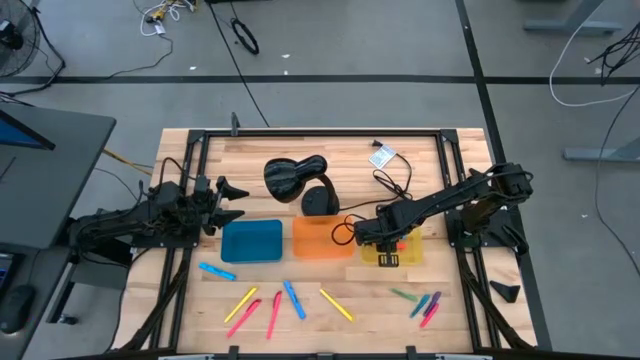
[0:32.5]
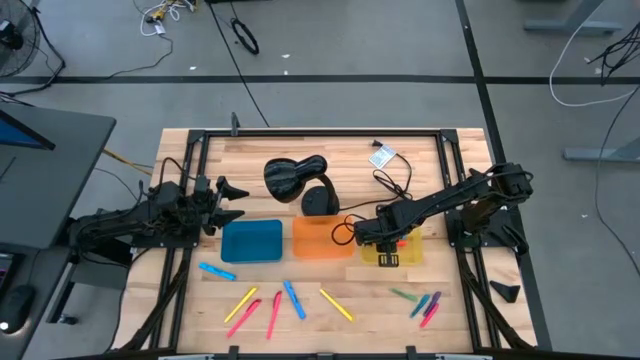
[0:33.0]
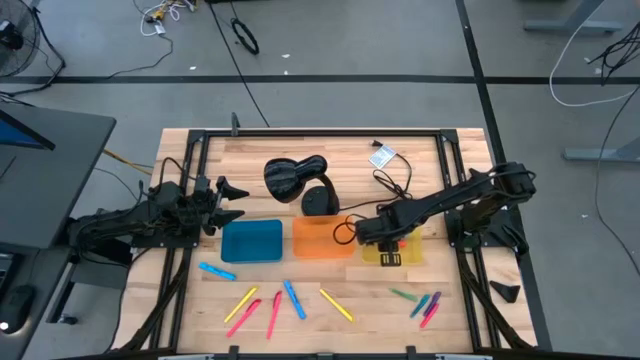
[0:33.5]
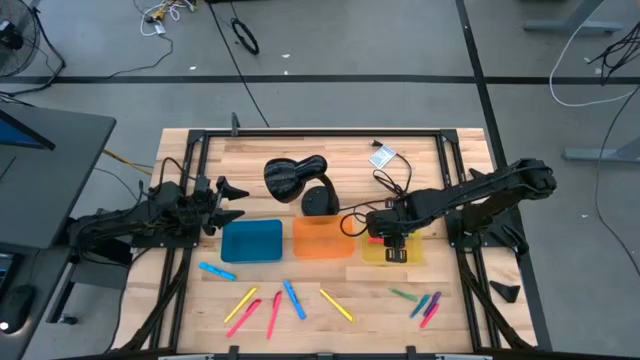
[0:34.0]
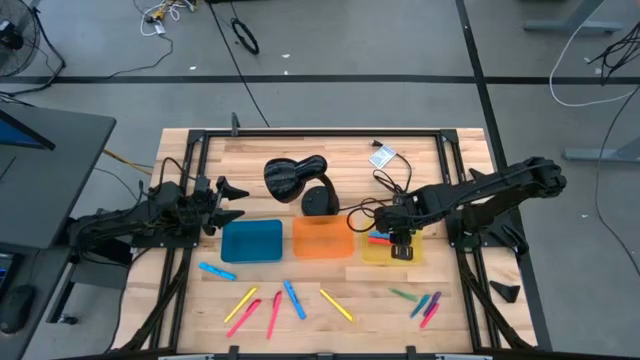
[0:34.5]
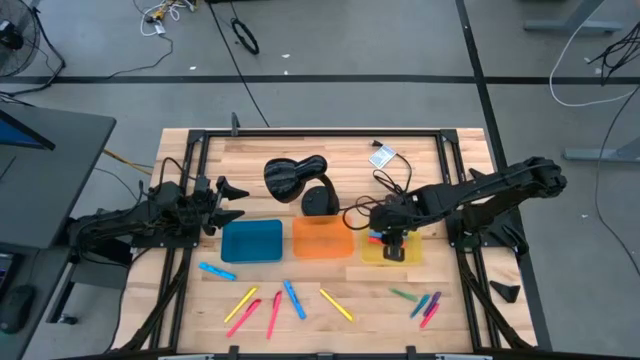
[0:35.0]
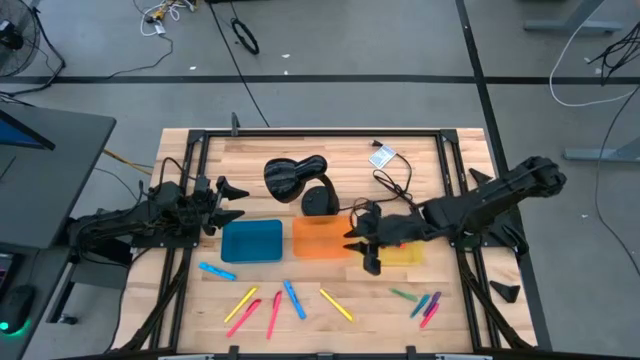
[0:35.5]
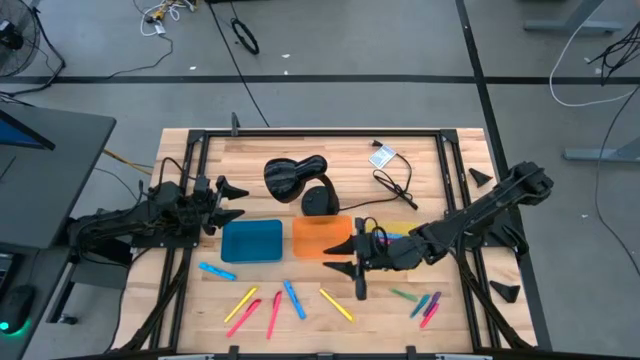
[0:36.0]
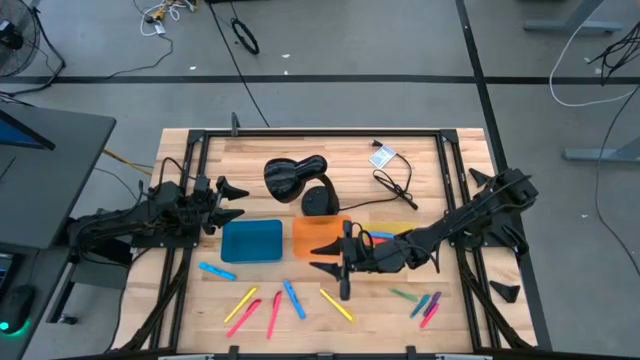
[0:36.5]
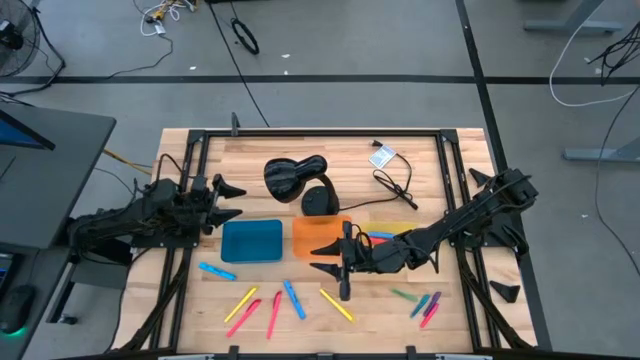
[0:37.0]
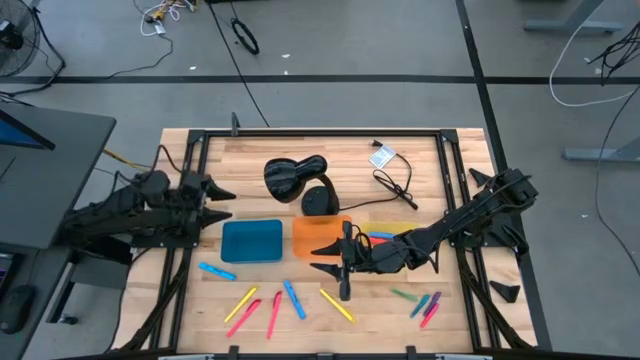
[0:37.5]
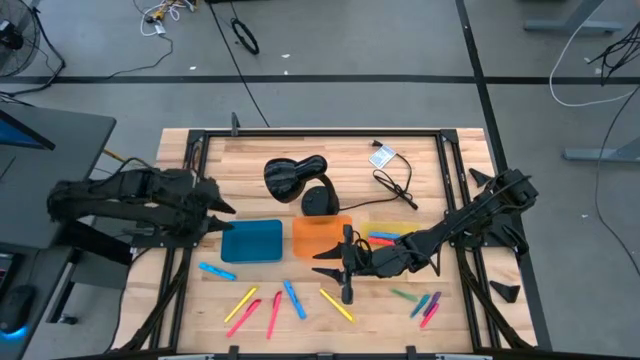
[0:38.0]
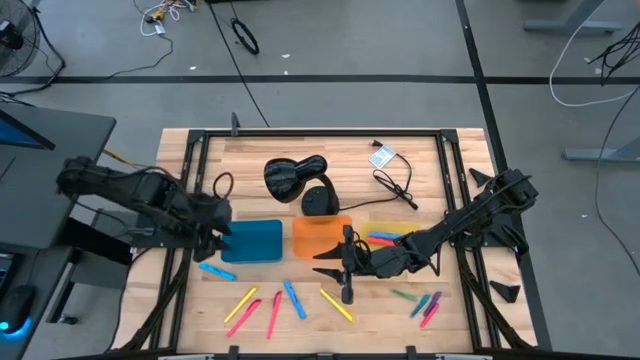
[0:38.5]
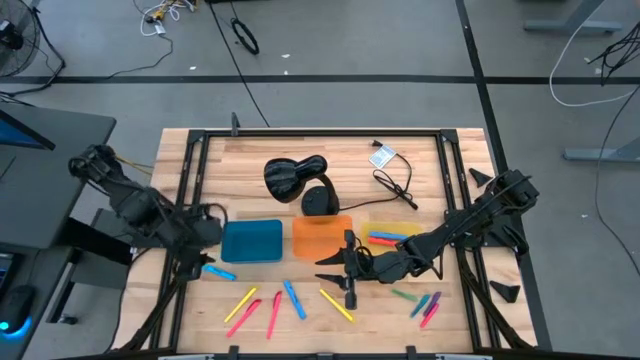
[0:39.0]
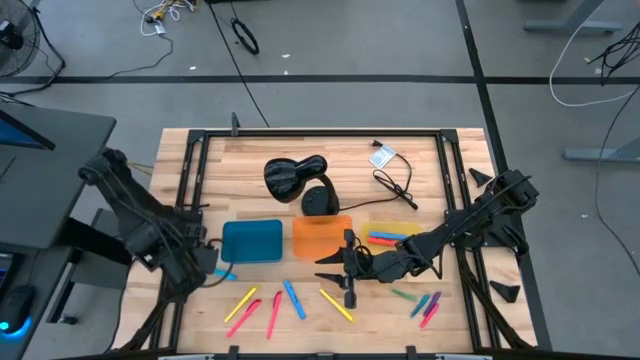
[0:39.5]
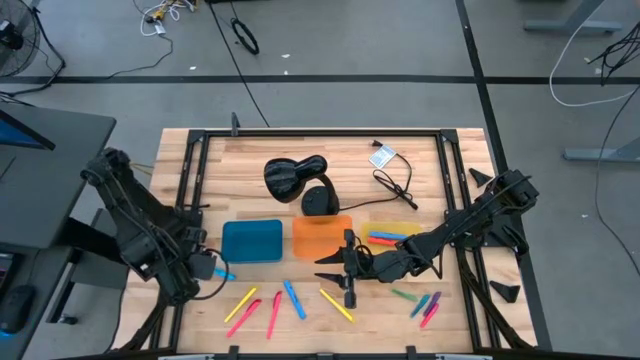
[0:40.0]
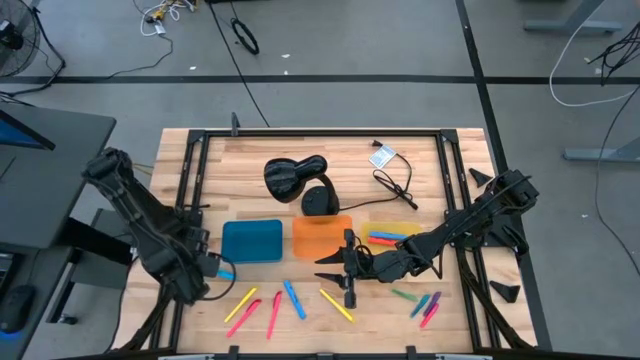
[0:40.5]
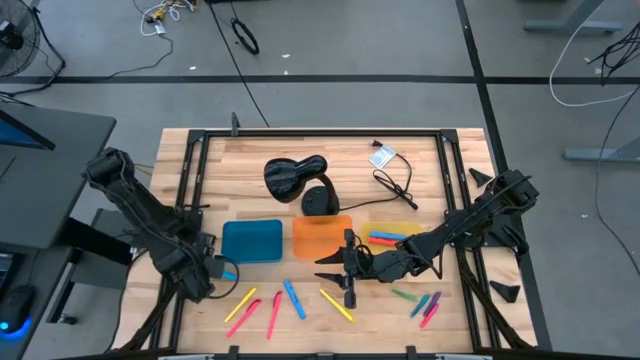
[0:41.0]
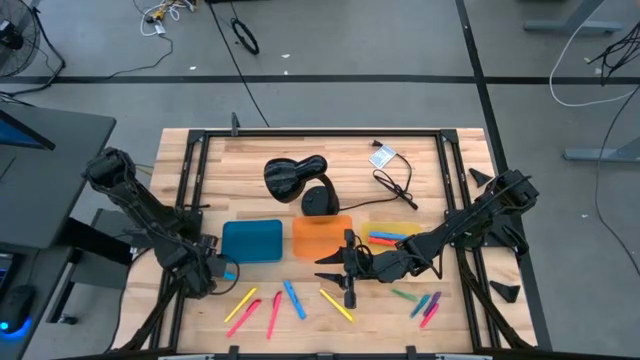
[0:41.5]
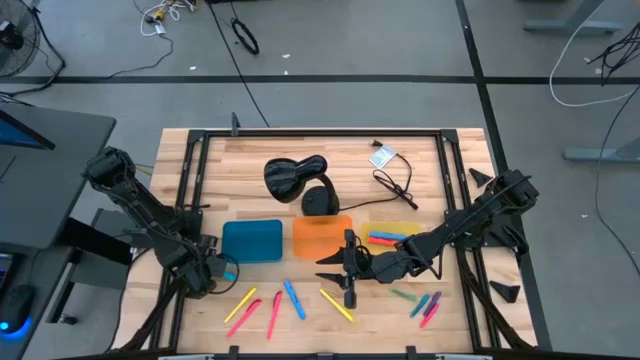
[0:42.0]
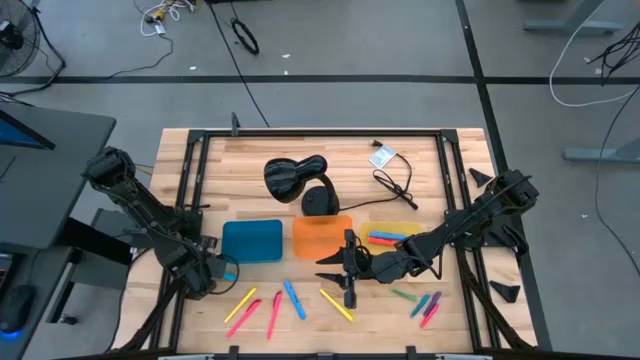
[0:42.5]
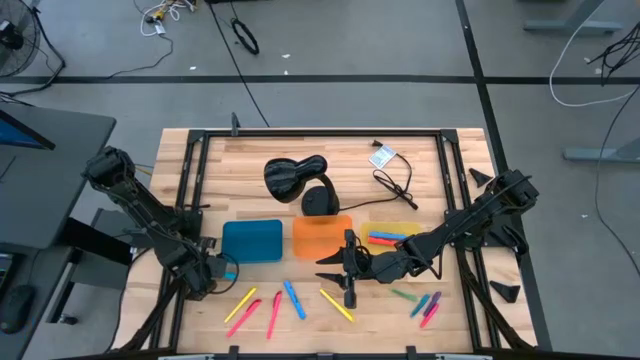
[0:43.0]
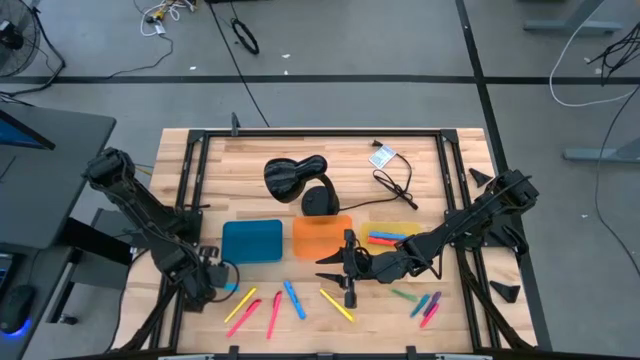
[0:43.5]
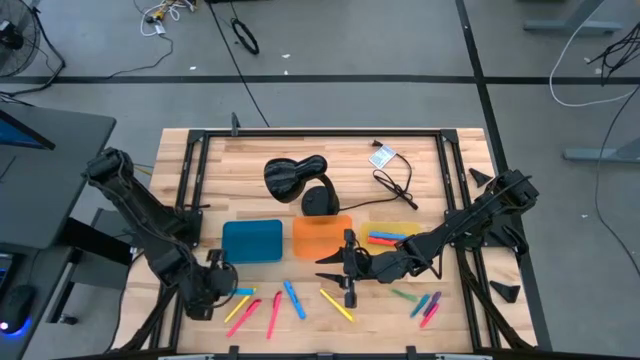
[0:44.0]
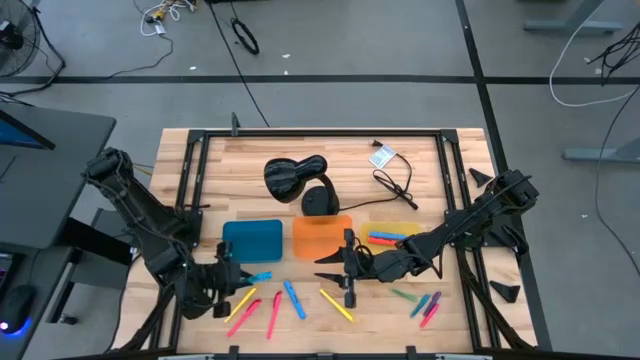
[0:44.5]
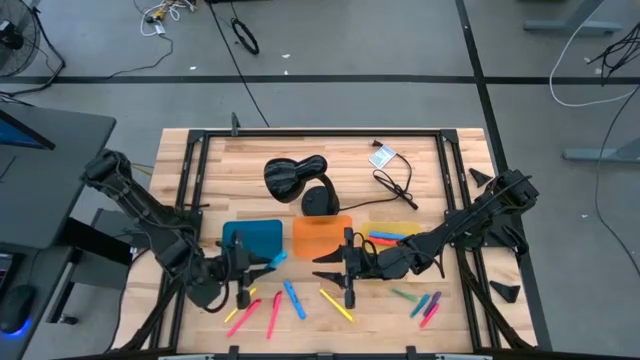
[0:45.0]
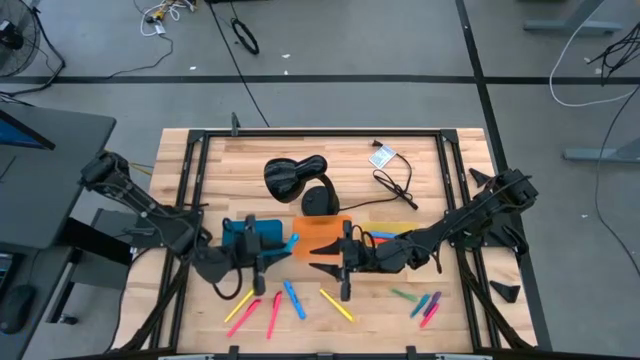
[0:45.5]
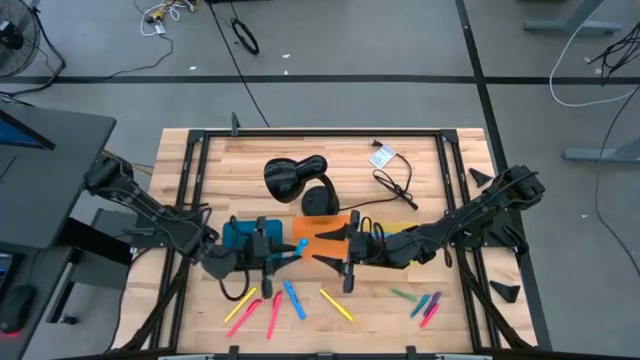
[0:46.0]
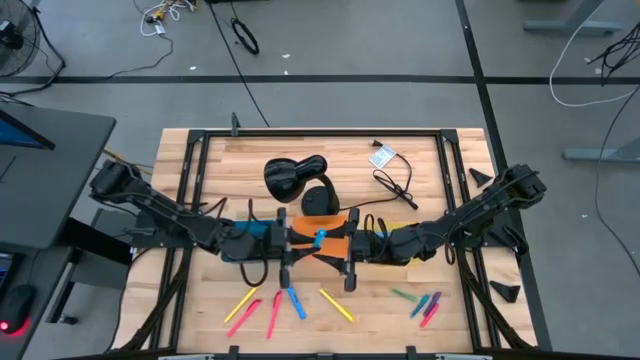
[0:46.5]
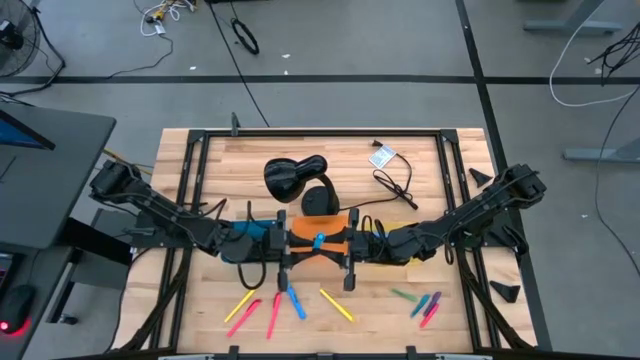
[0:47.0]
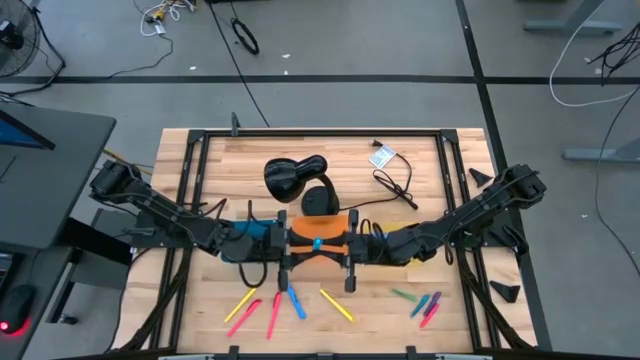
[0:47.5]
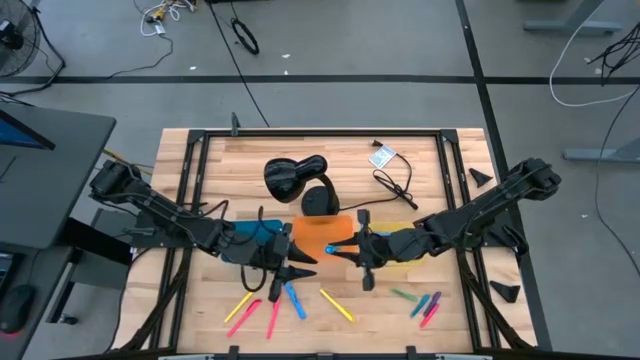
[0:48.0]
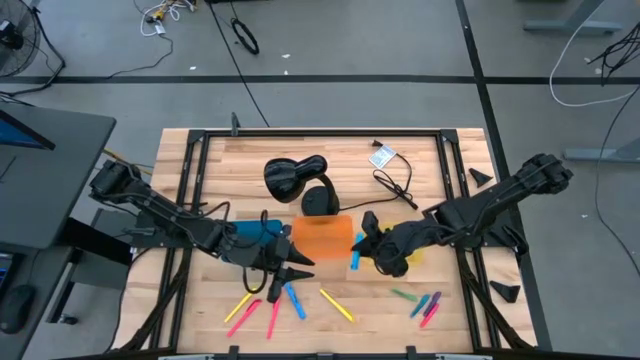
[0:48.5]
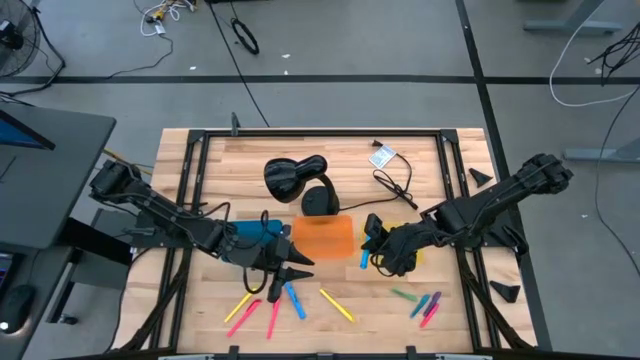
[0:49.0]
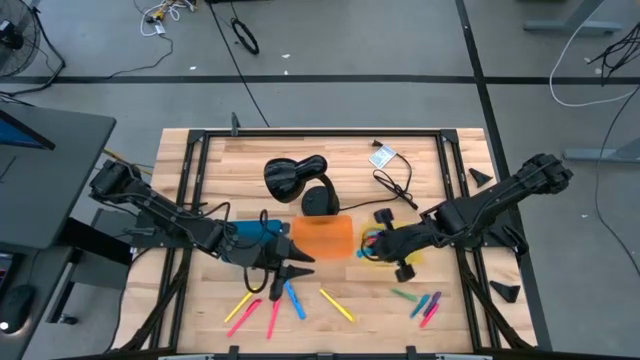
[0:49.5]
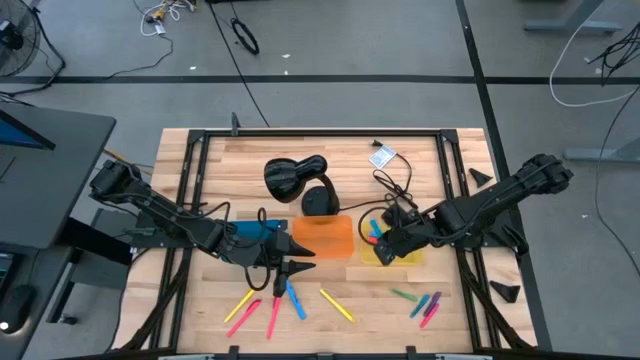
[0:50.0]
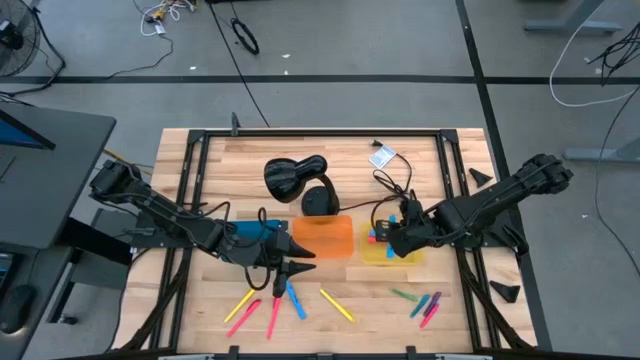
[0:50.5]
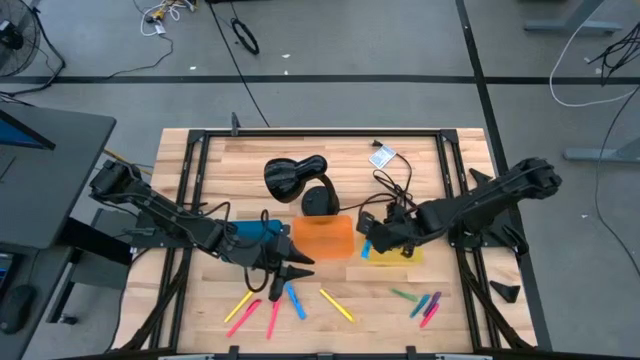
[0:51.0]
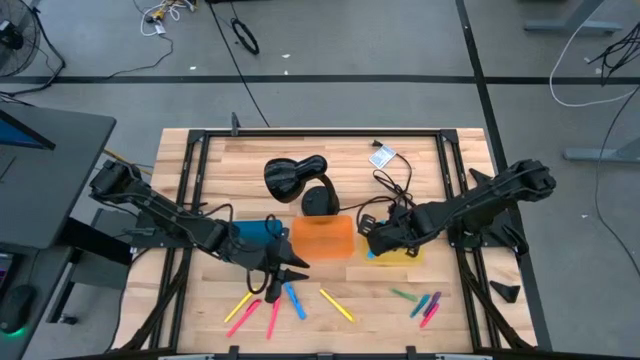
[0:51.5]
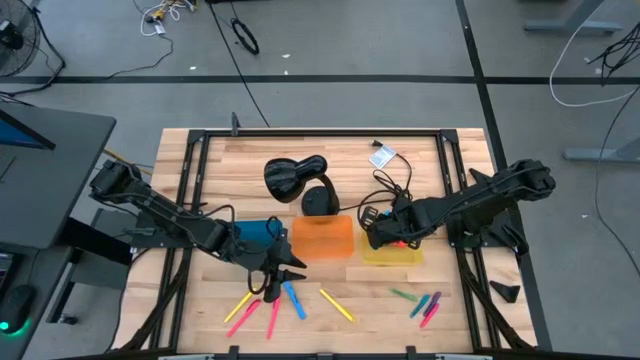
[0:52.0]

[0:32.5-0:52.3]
Task: Pick & Place Markers
Put the left blue highlighter pen into the yellow bin
